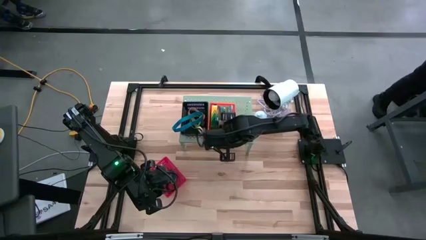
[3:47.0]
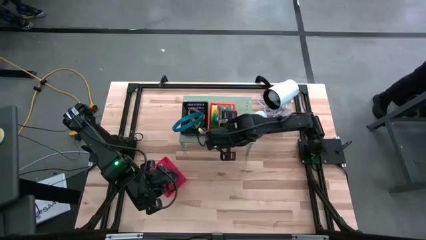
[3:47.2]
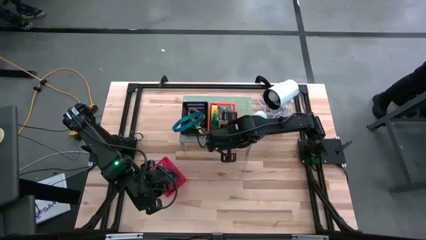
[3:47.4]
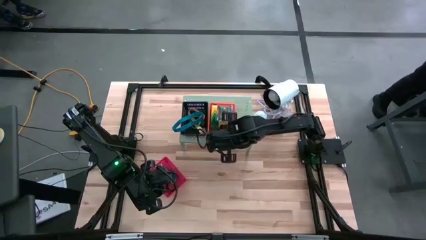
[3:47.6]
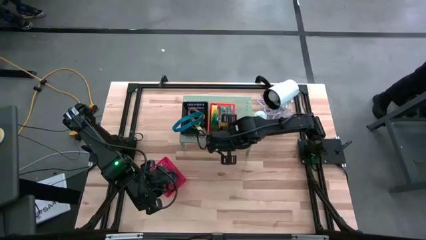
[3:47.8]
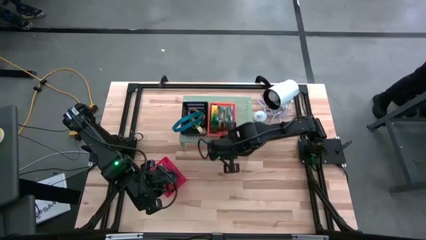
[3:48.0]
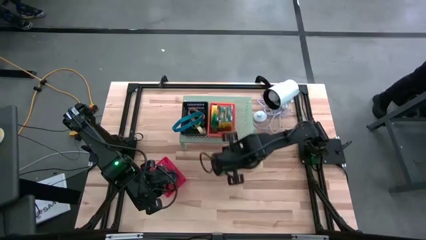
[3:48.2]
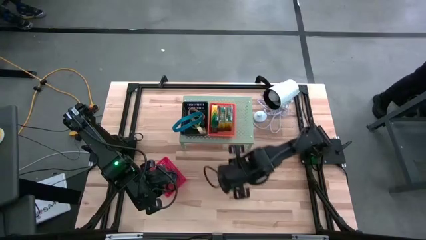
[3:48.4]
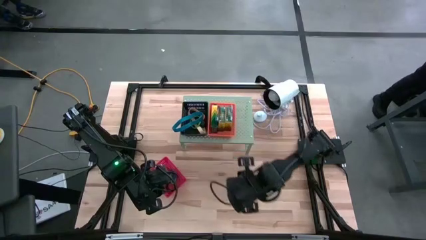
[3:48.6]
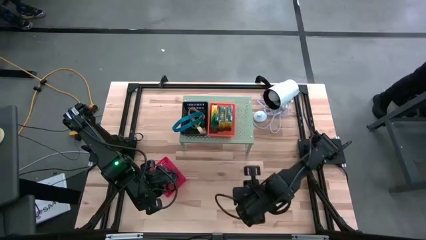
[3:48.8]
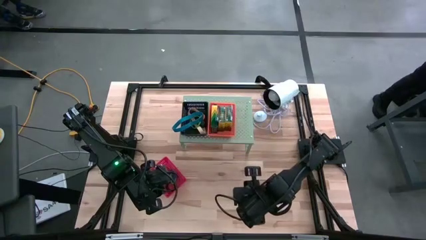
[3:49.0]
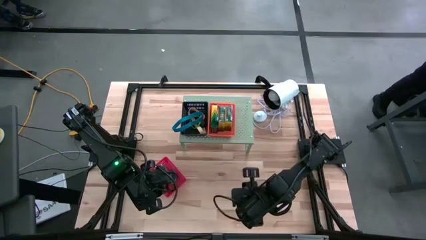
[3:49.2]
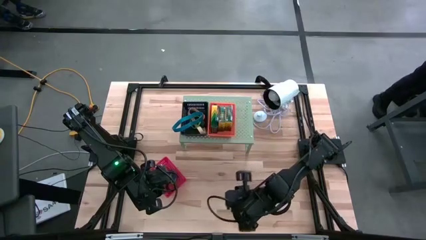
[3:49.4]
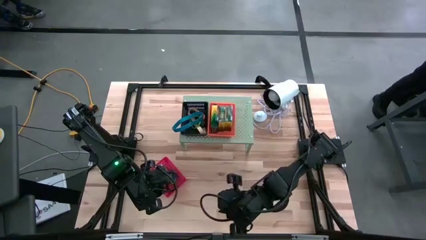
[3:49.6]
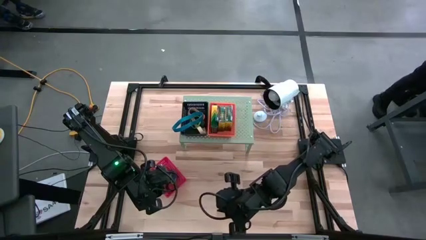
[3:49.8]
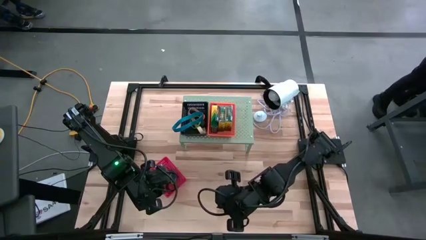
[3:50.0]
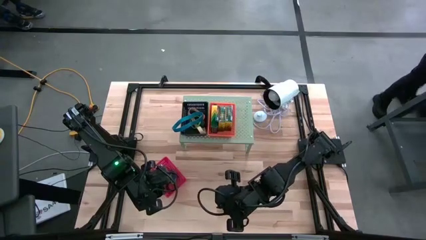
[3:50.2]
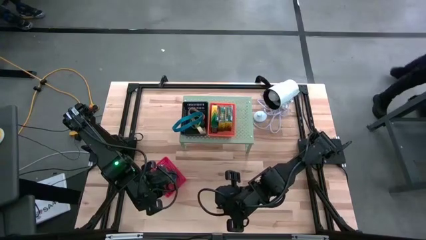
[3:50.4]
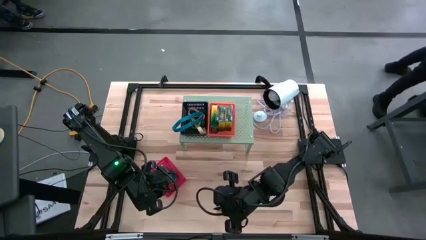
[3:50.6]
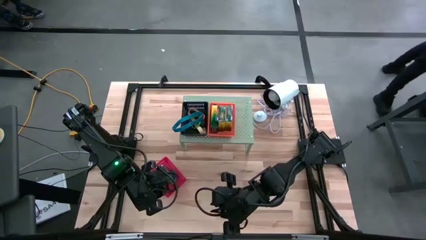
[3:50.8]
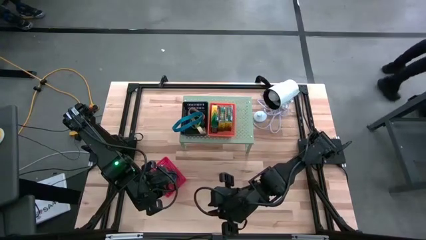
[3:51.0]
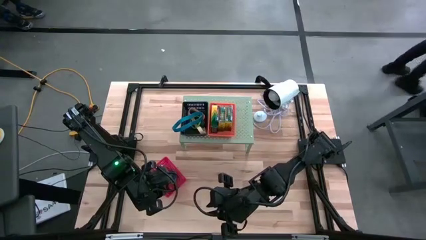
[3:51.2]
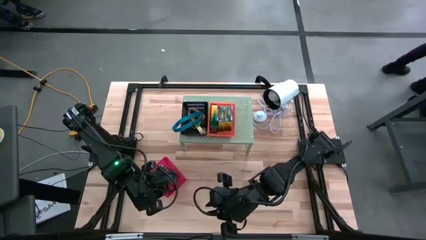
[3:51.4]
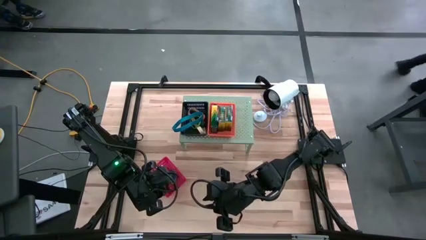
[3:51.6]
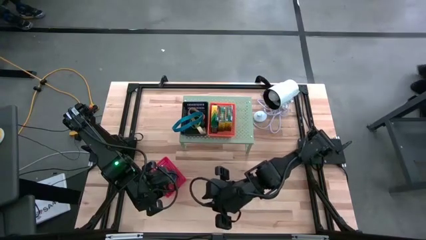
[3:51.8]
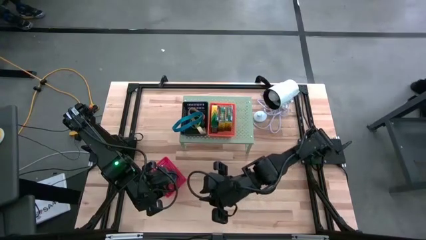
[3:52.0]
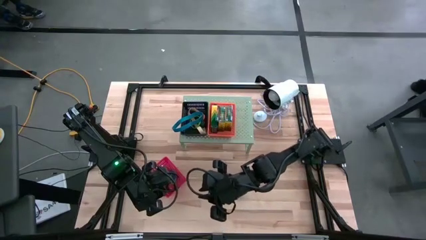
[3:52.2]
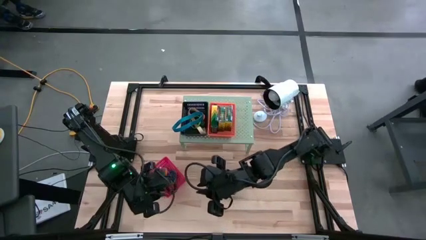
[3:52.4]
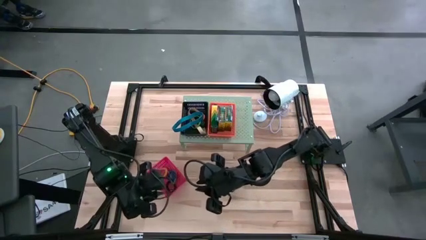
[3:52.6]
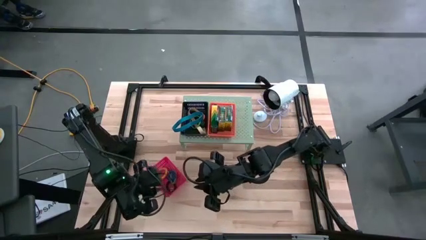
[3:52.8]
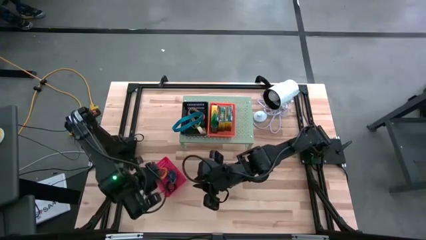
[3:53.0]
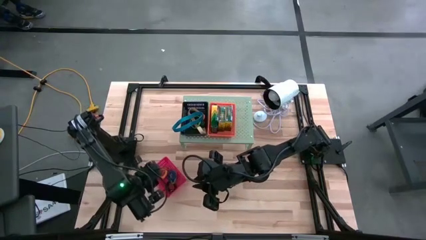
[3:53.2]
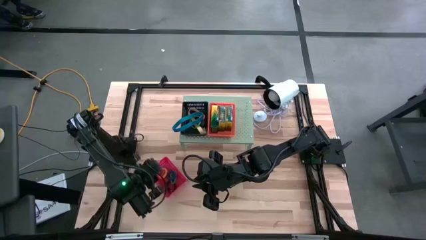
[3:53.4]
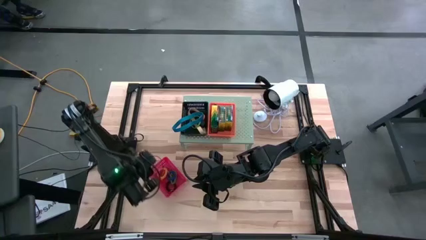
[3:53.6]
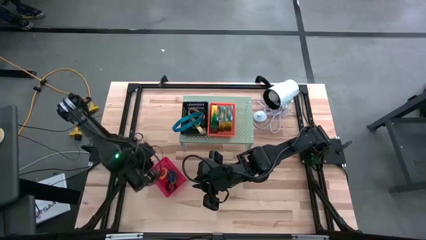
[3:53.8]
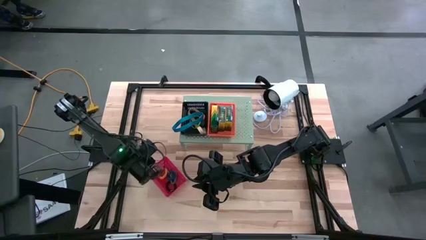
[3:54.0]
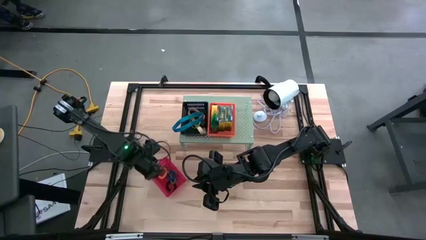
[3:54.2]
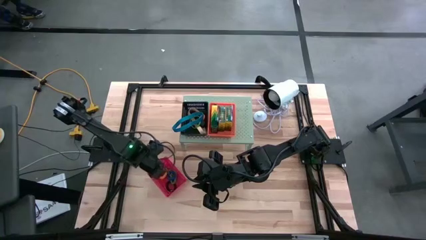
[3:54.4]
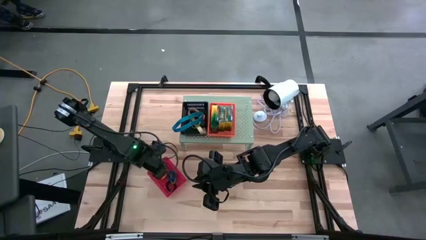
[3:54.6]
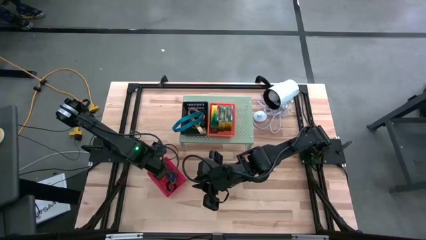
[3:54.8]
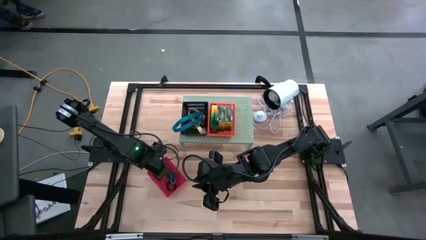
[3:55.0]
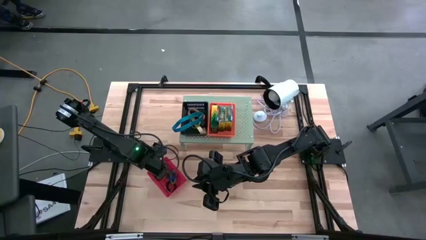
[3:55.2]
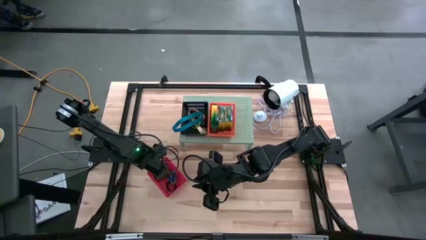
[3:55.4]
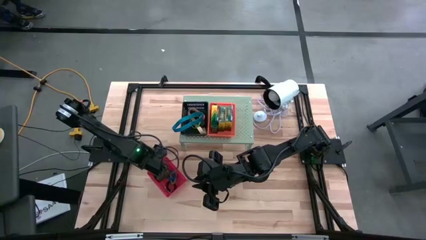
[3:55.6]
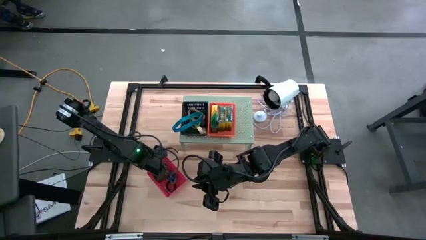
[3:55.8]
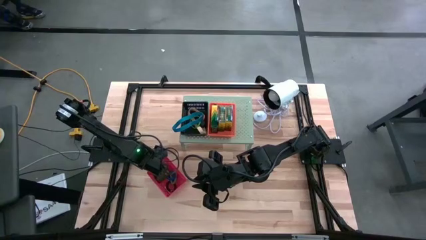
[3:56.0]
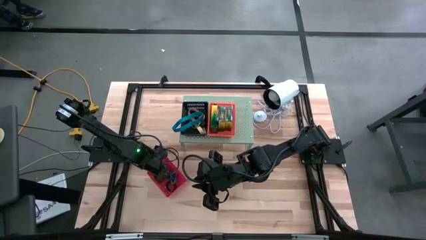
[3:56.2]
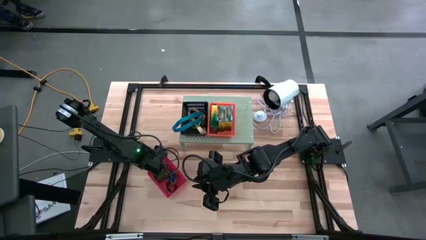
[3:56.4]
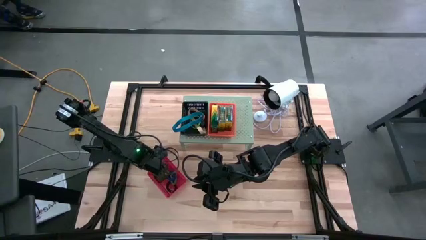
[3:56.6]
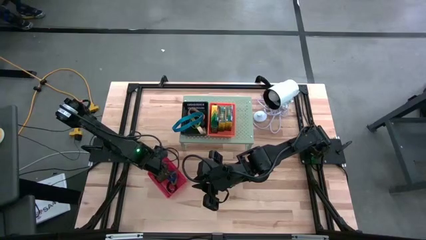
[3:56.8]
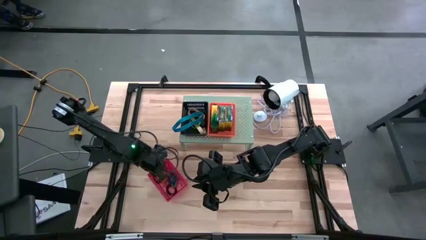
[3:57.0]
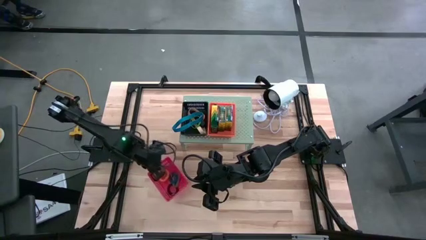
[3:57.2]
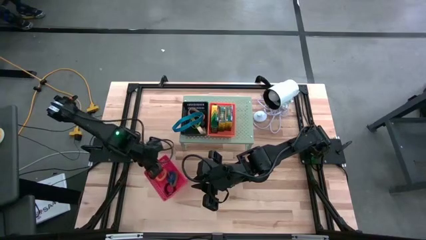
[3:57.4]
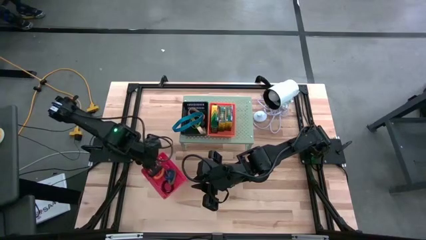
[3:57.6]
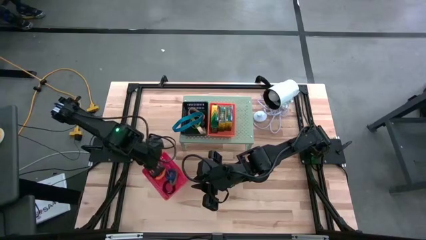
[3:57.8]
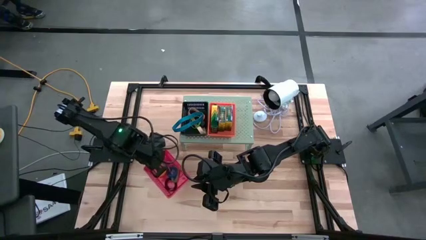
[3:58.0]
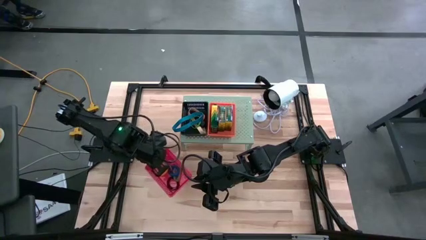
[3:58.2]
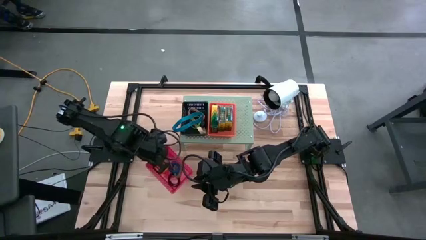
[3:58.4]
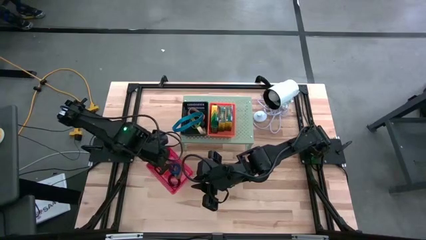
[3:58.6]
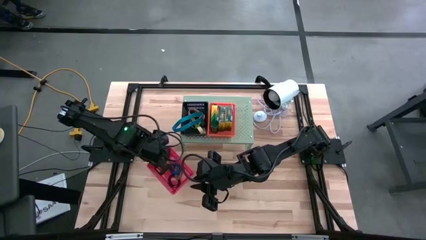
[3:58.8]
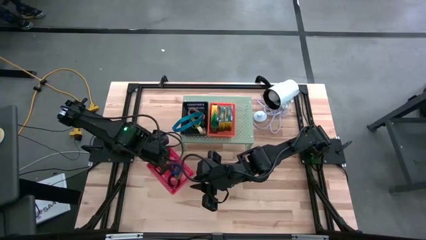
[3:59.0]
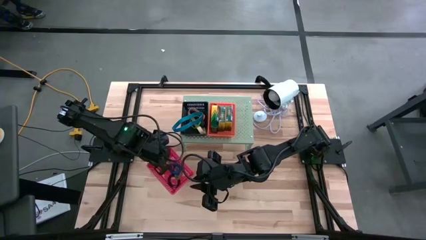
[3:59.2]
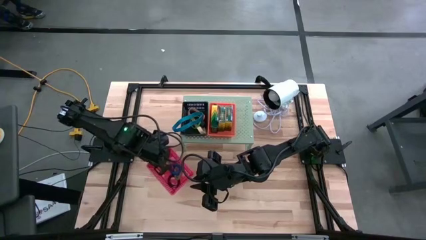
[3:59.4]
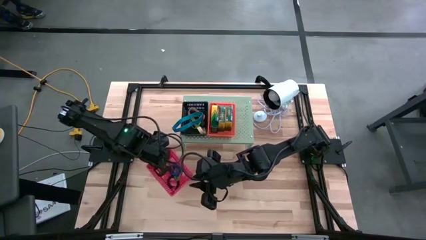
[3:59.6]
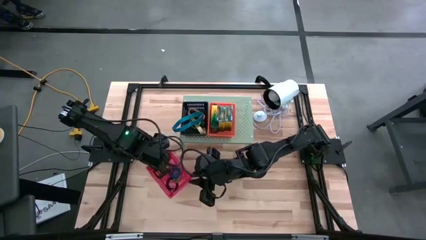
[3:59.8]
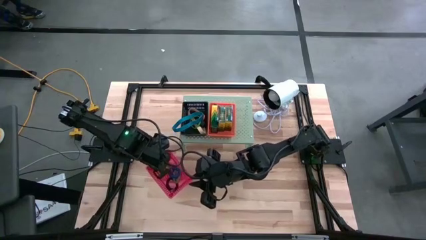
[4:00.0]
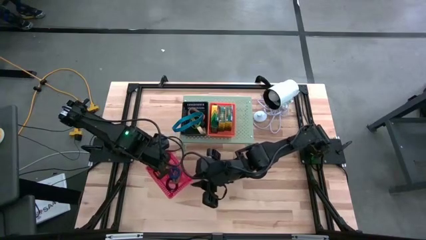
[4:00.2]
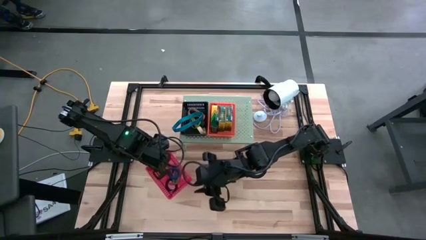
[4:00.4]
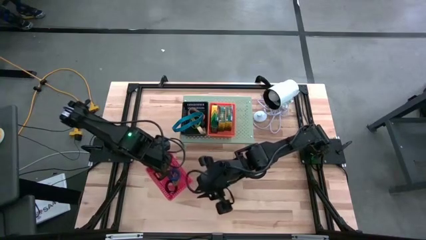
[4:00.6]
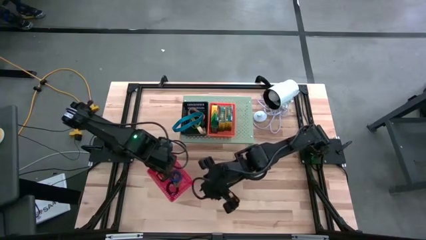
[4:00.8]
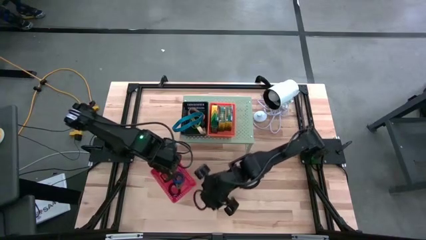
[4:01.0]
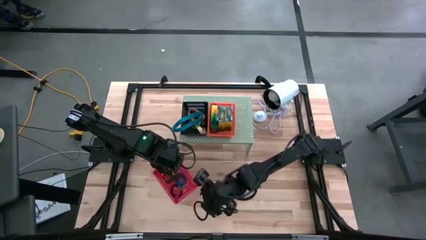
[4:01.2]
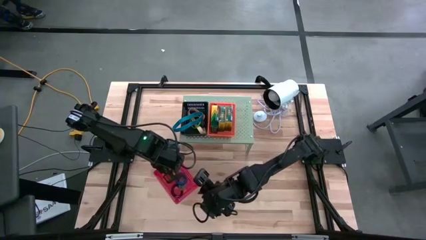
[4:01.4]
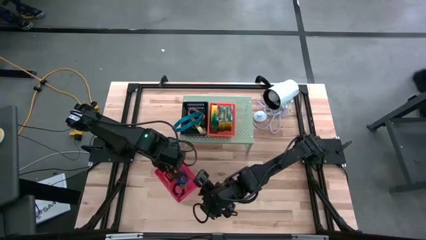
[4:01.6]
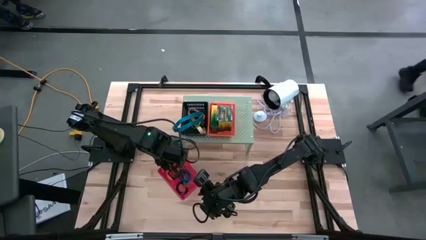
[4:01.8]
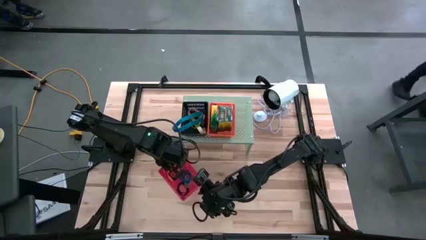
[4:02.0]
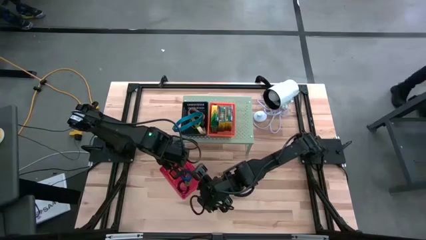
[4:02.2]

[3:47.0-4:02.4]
Task: Pick & Place Office Desk Supplies
Put the red bin with spring keychains on the shelf

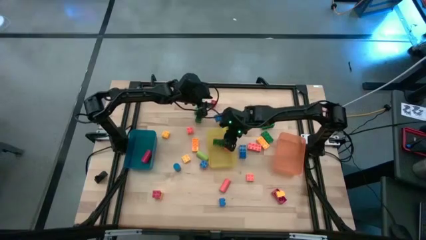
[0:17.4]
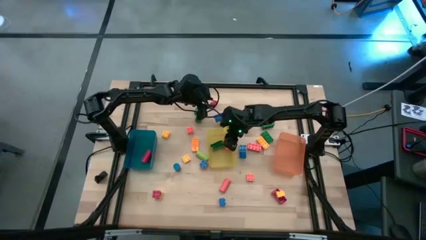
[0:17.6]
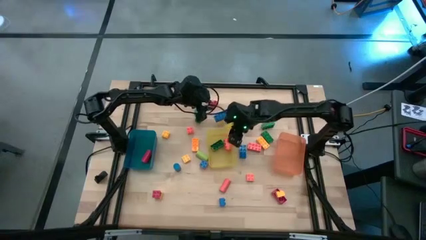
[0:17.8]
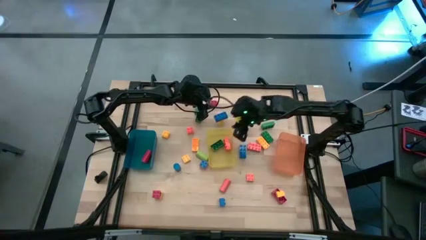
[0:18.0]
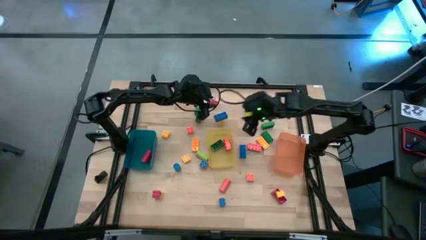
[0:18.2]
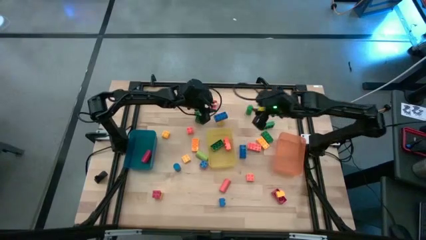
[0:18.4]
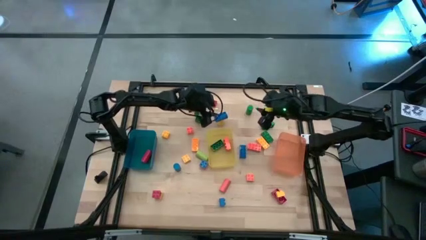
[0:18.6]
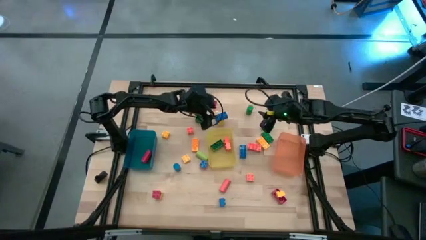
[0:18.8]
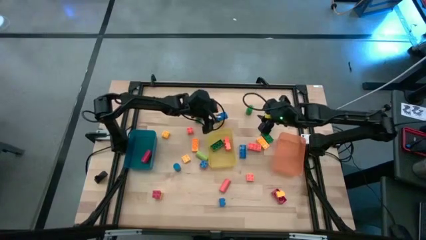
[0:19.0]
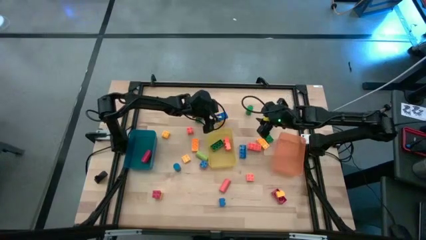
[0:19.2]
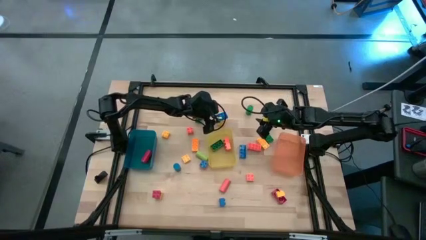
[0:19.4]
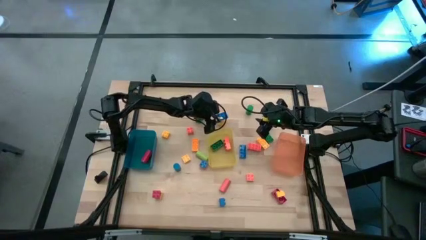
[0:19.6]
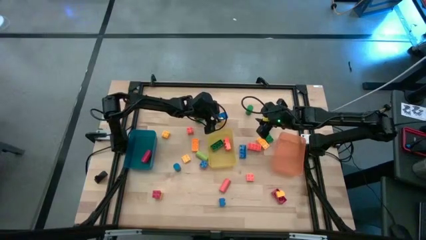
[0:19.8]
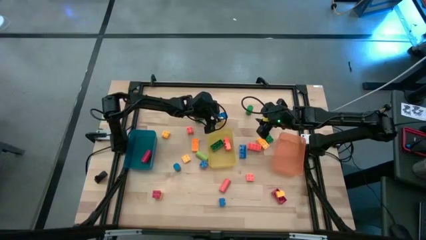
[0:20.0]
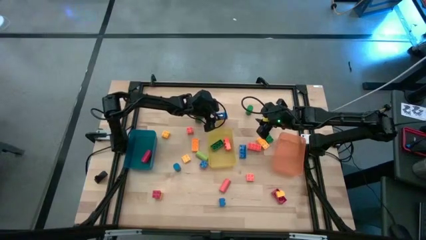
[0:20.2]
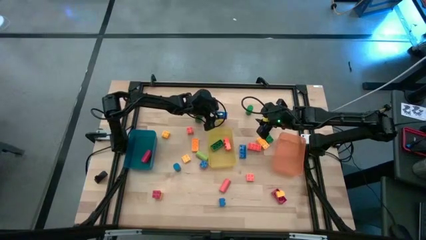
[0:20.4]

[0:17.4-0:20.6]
Task: Sort blocks by size
Put the blue 8 stud game piece into the yellow bin
